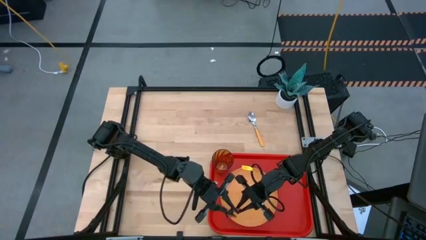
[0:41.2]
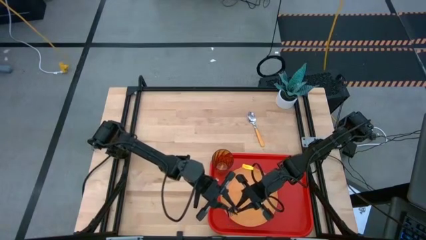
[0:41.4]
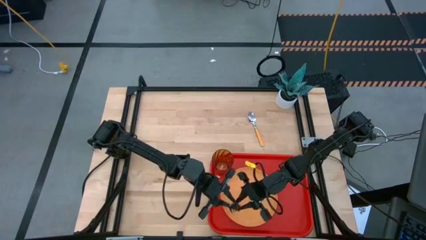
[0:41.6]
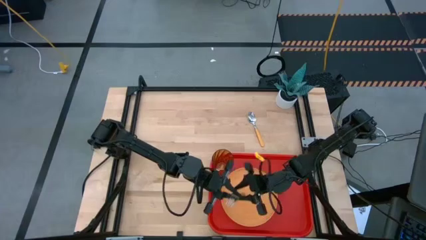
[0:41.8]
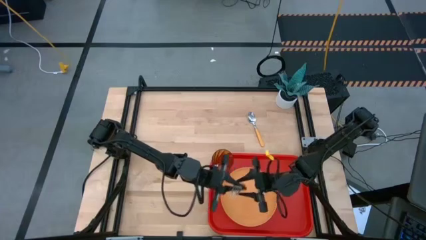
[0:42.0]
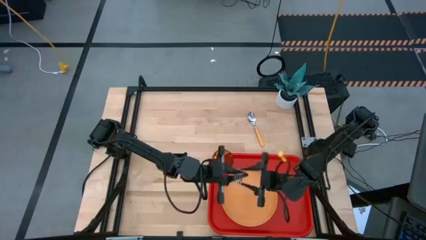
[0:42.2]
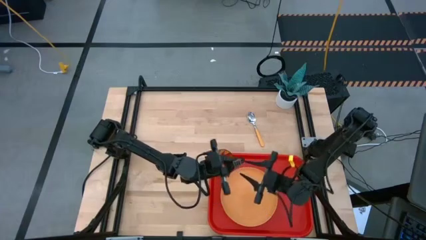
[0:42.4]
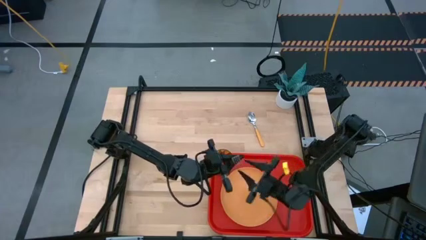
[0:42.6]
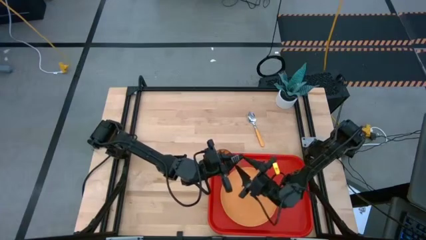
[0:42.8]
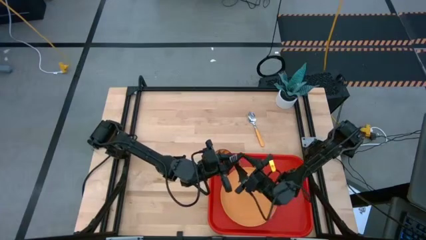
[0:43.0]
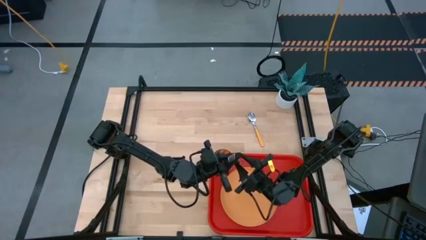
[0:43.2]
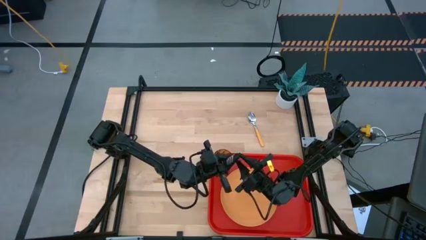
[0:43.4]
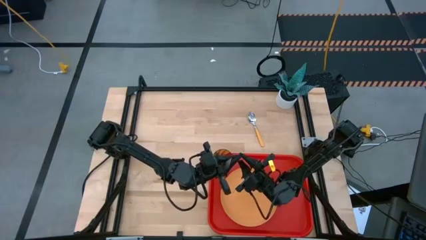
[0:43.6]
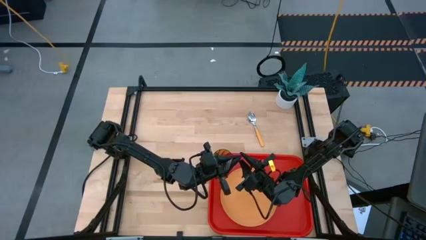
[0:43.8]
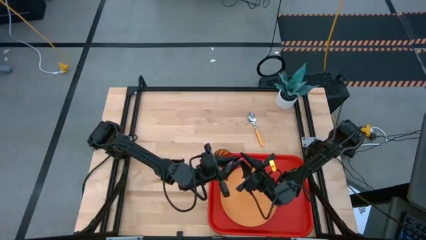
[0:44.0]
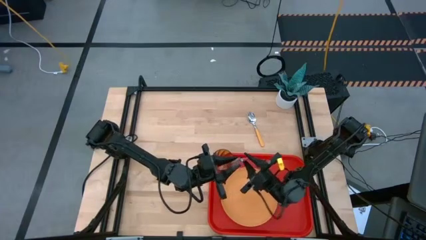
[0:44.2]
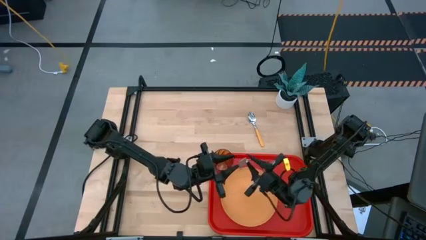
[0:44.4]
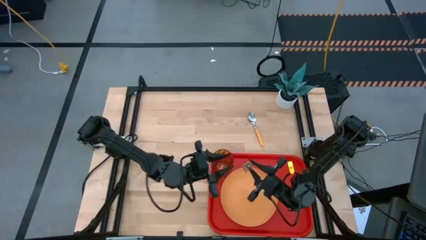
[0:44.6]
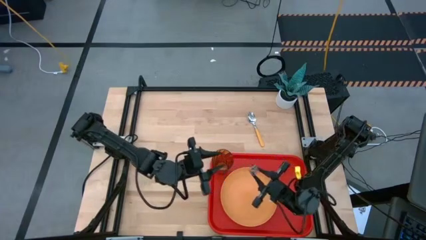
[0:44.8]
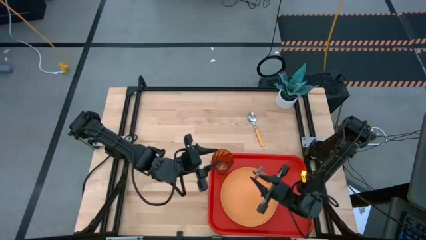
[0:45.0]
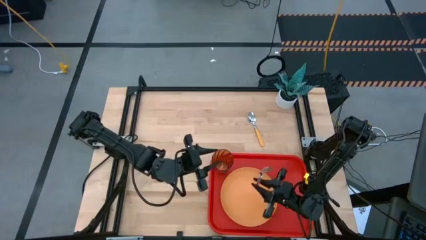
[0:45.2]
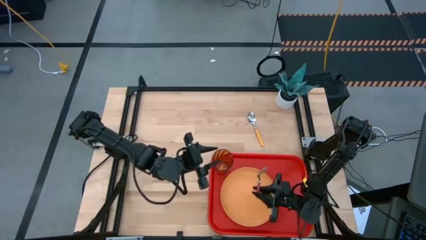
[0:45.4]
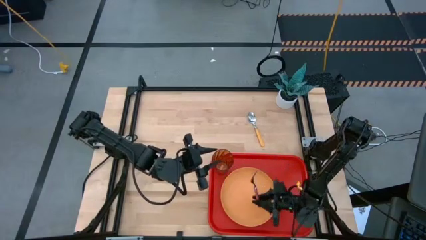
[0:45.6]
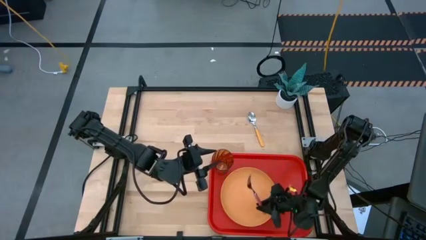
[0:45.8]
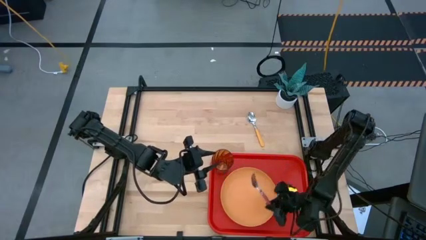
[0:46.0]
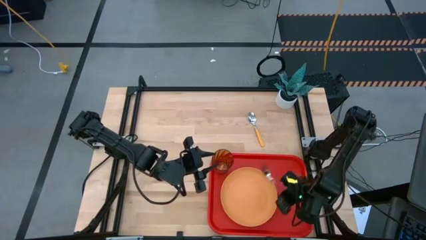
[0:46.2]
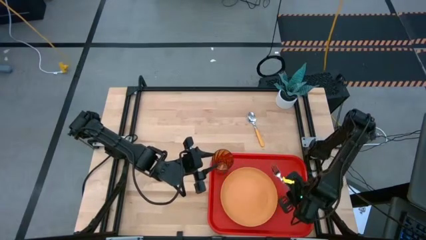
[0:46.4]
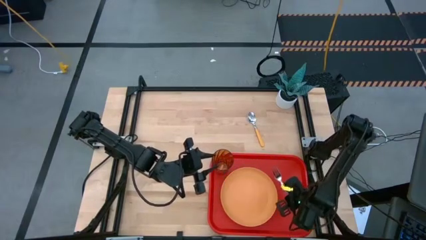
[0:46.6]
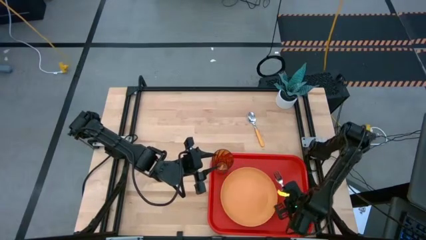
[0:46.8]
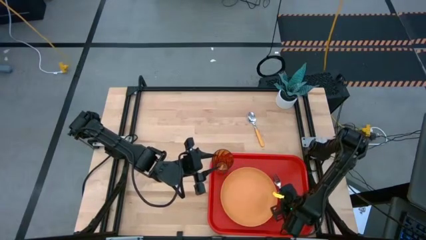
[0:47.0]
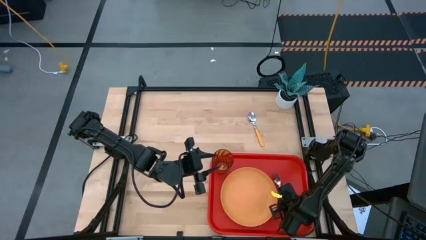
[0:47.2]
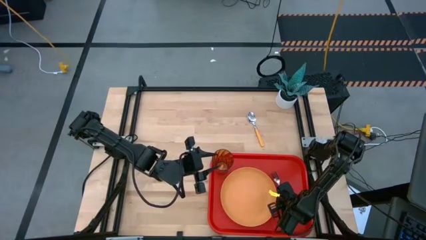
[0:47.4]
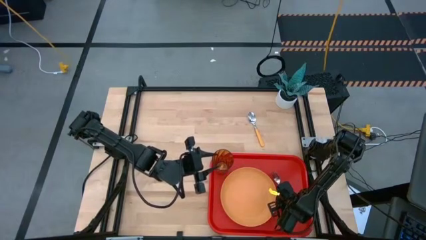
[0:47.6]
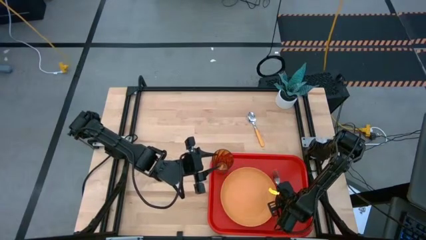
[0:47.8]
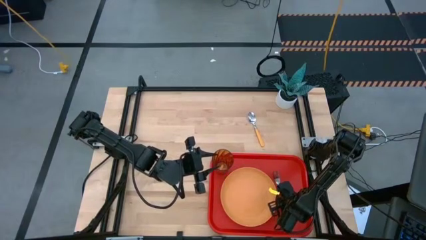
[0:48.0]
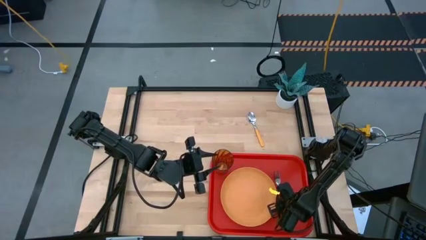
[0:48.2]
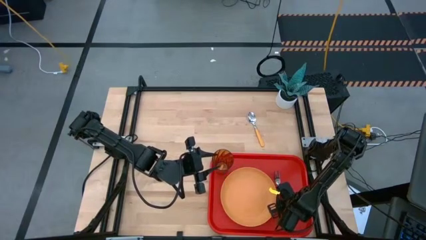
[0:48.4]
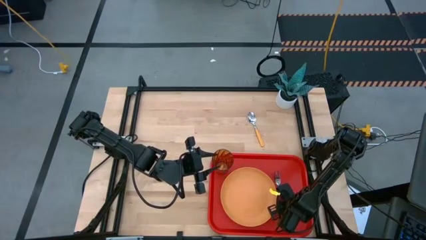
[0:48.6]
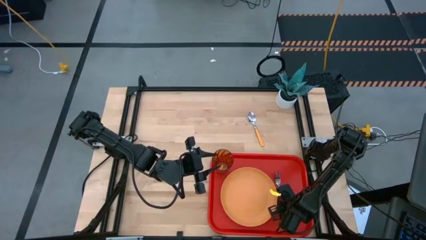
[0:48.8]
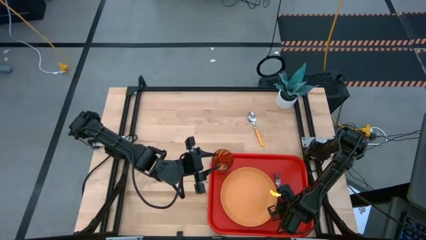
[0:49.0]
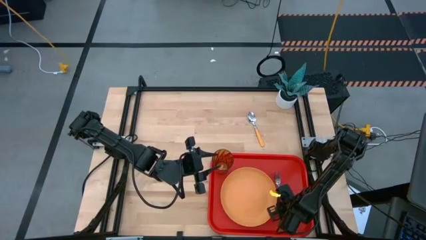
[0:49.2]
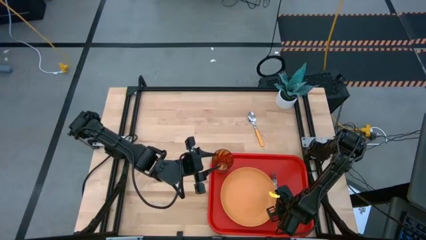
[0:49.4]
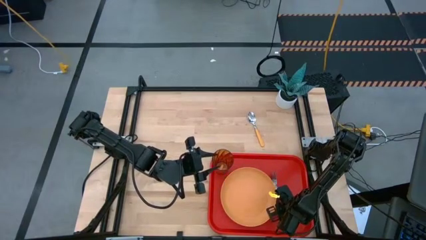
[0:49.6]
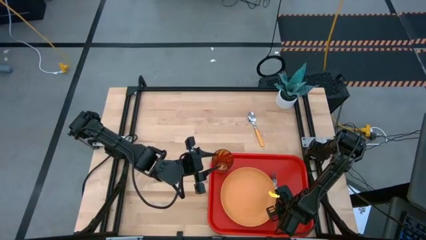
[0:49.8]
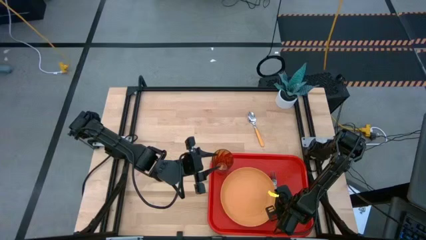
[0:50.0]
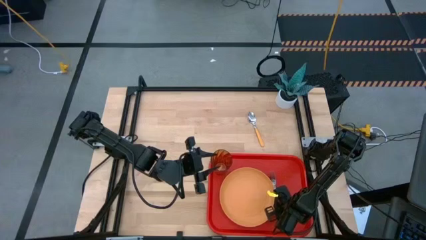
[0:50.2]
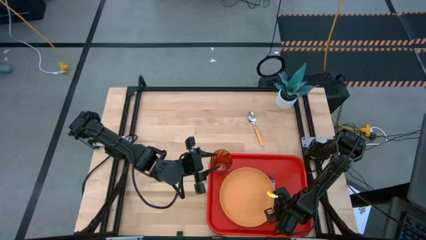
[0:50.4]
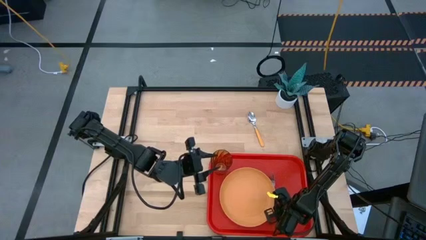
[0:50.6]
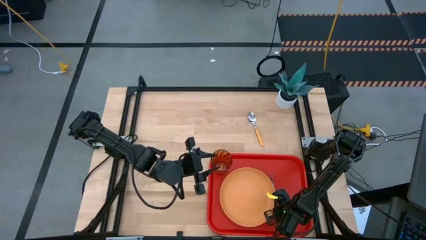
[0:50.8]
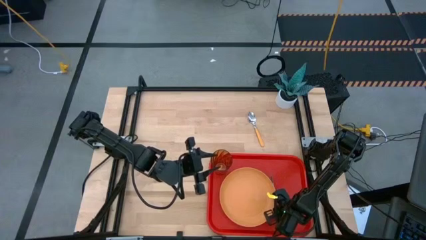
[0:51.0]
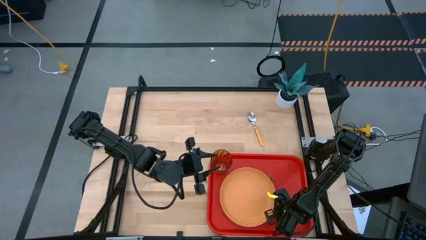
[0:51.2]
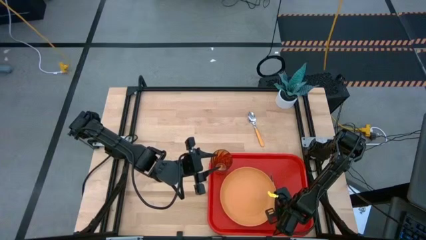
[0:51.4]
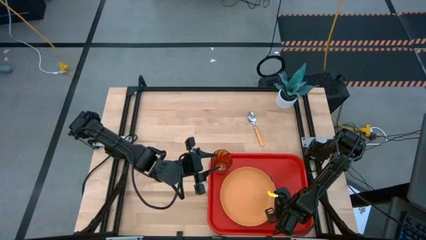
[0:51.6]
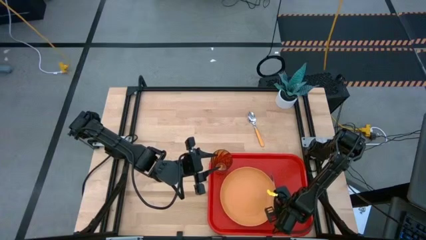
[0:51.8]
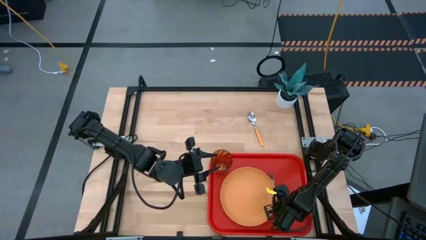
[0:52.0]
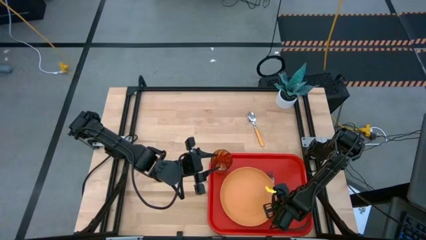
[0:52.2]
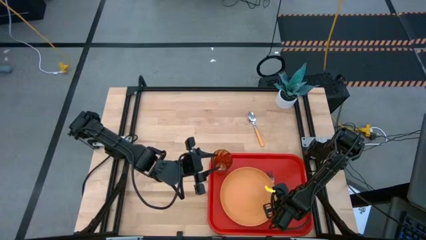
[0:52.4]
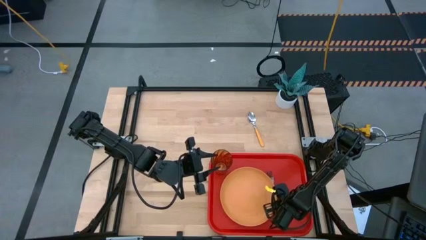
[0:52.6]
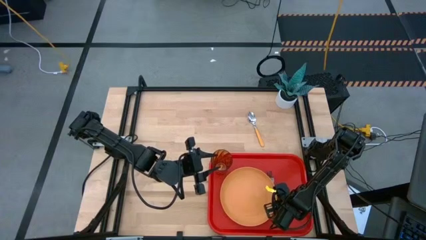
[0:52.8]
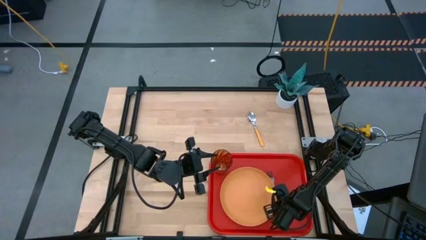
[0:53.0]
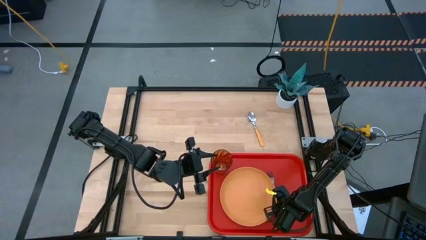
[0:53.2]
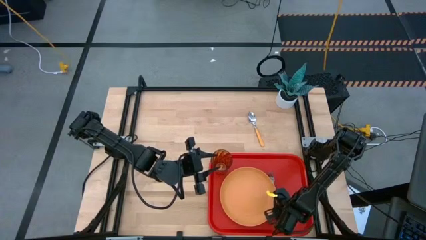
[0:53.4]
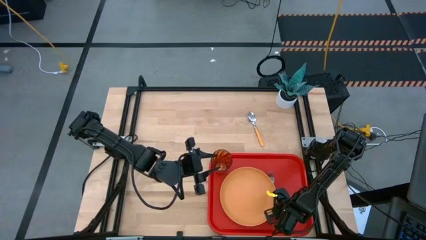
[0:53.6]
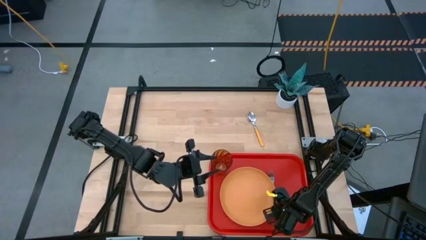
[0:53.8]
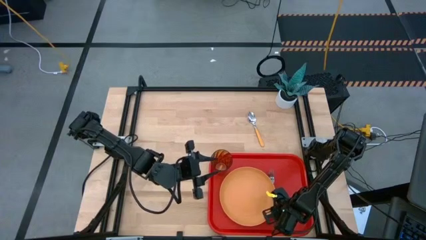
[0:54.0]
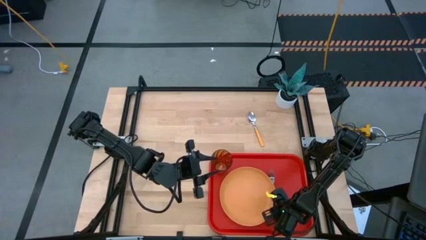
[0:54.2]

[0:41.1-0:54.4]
Task: Pick and place plate/cup/fork/spoon on tray
Put the pink fork to the right of the orange plate on the red tray
